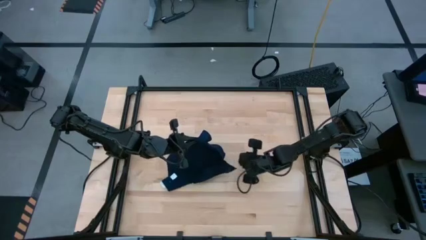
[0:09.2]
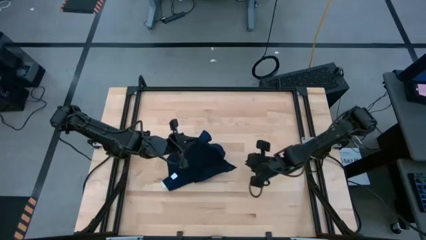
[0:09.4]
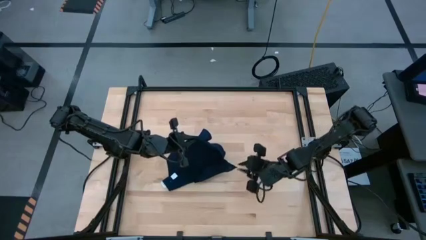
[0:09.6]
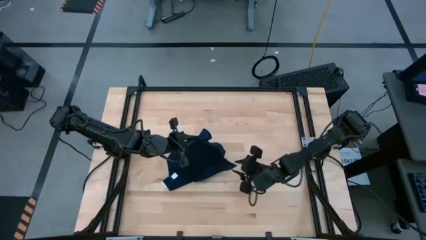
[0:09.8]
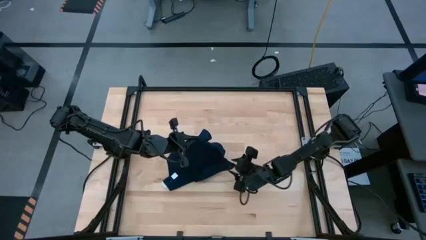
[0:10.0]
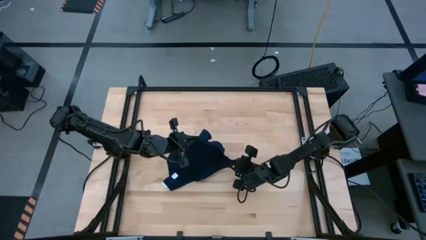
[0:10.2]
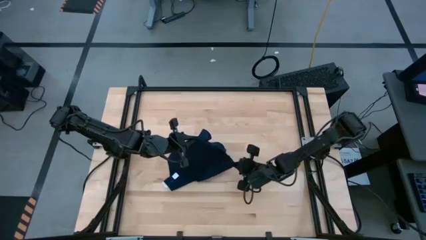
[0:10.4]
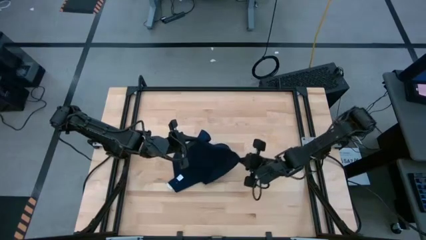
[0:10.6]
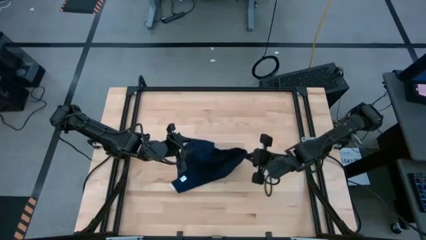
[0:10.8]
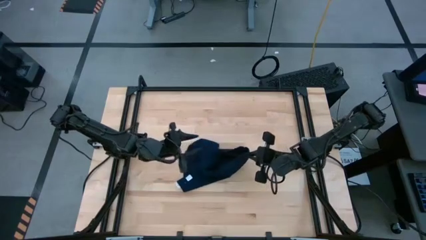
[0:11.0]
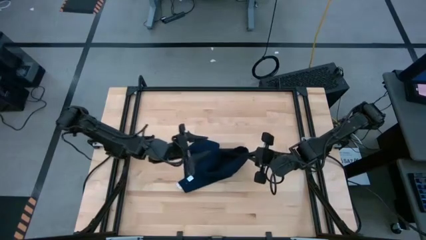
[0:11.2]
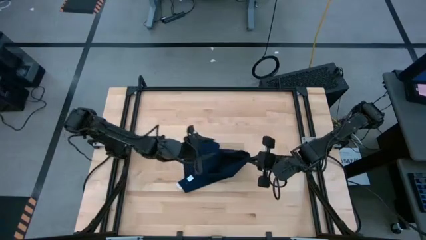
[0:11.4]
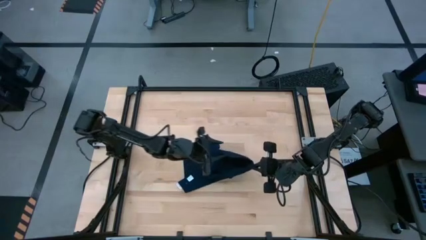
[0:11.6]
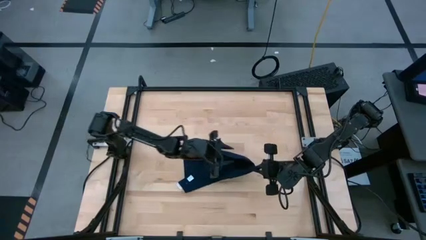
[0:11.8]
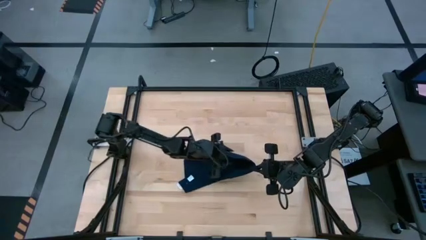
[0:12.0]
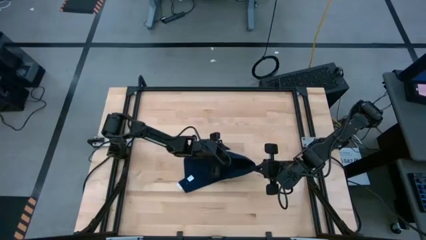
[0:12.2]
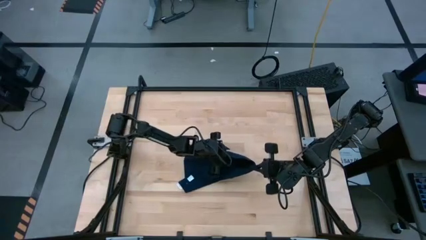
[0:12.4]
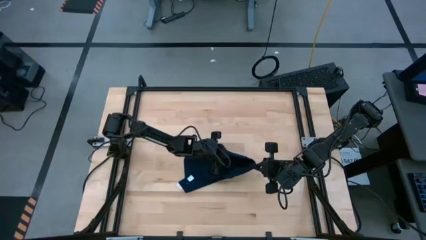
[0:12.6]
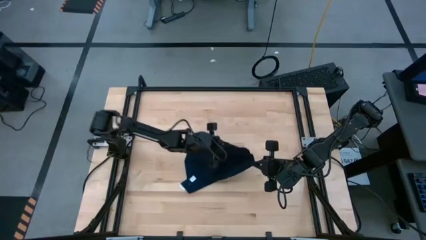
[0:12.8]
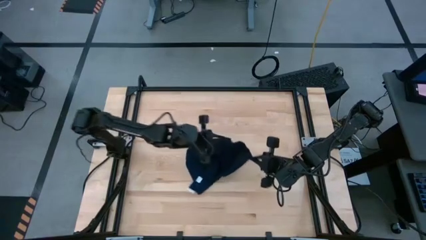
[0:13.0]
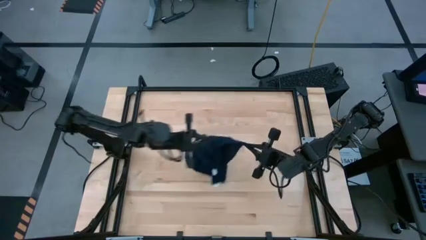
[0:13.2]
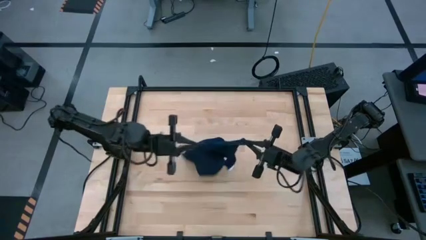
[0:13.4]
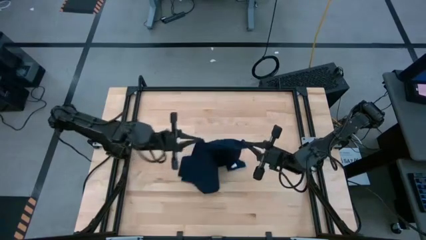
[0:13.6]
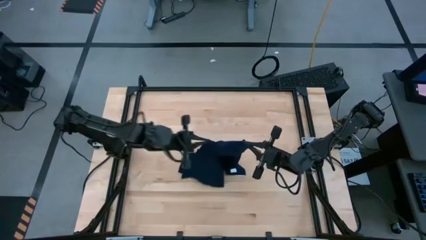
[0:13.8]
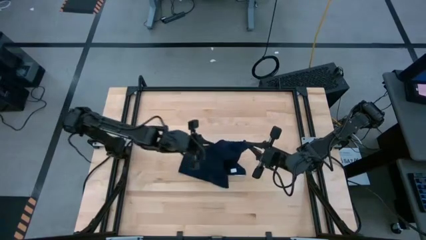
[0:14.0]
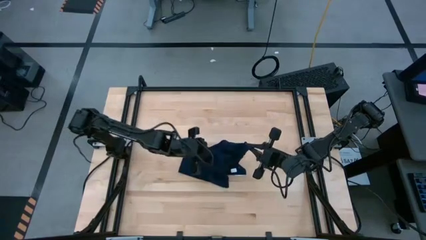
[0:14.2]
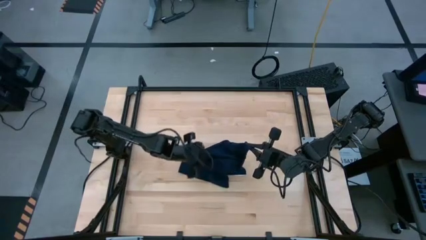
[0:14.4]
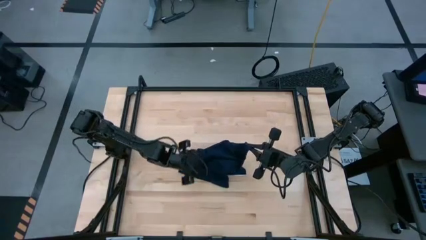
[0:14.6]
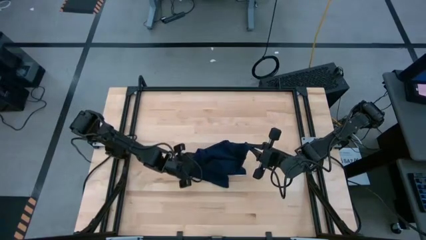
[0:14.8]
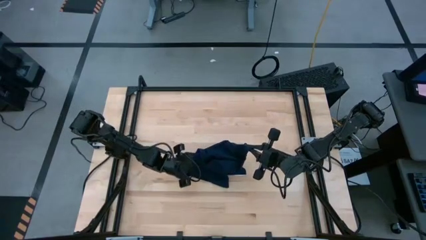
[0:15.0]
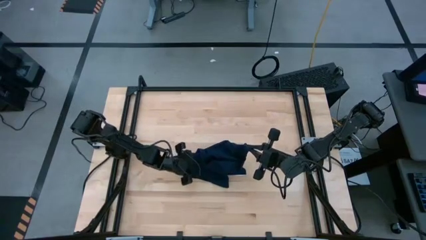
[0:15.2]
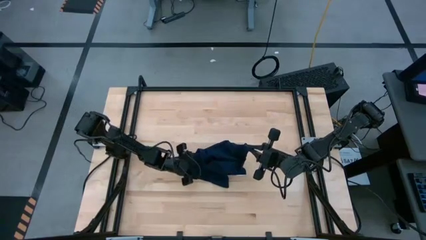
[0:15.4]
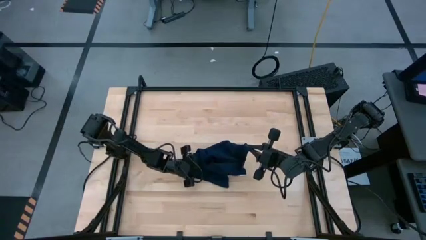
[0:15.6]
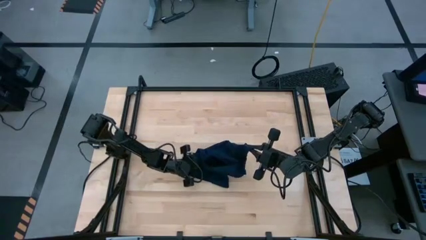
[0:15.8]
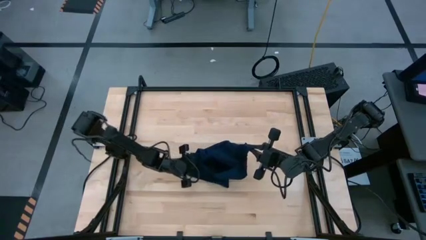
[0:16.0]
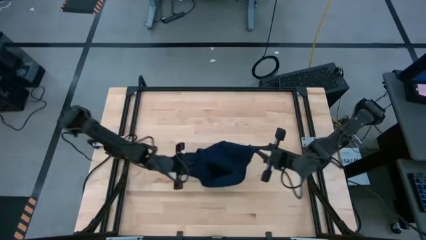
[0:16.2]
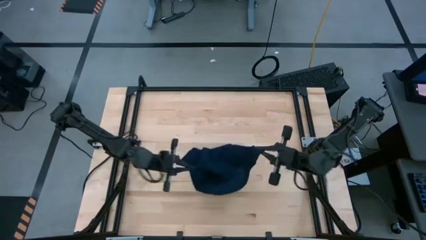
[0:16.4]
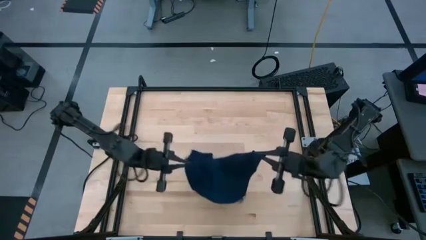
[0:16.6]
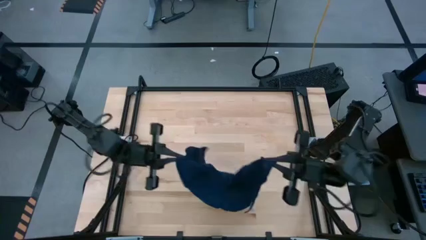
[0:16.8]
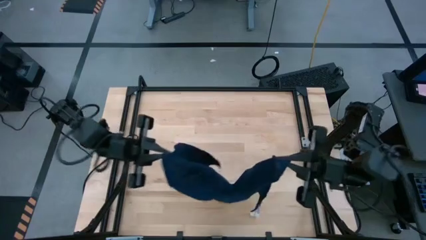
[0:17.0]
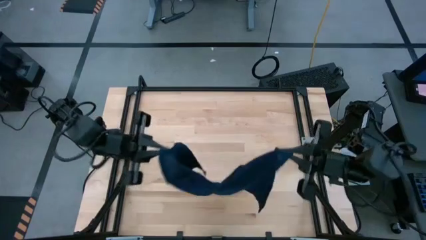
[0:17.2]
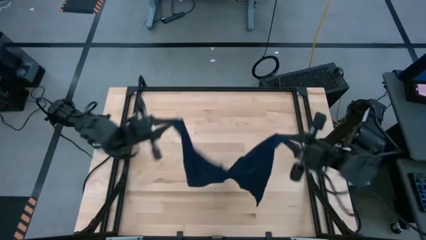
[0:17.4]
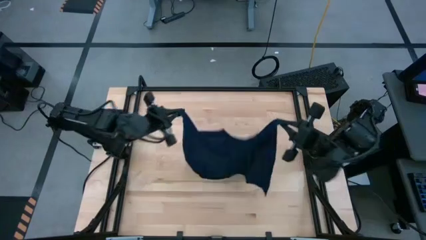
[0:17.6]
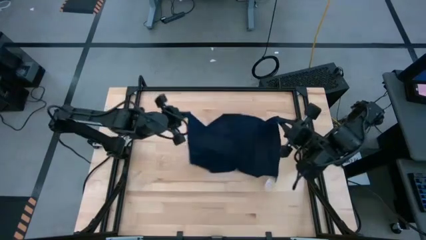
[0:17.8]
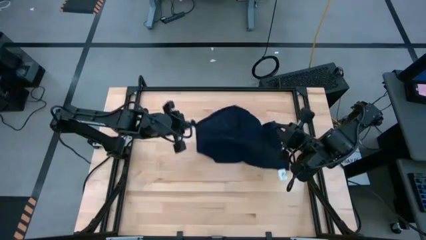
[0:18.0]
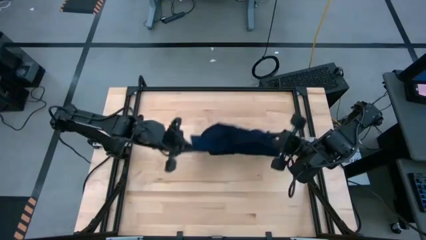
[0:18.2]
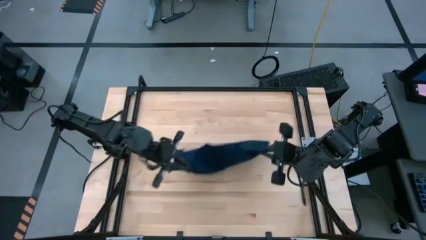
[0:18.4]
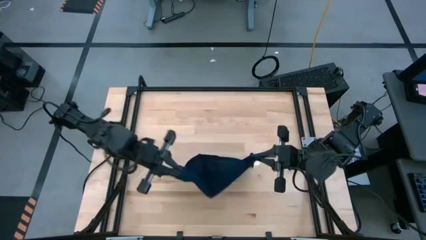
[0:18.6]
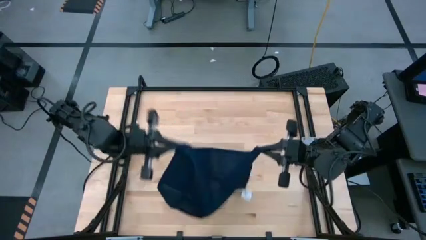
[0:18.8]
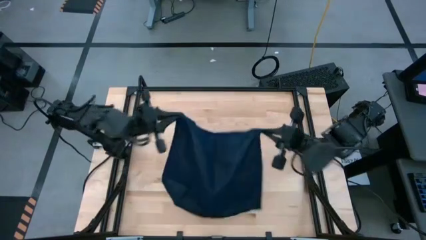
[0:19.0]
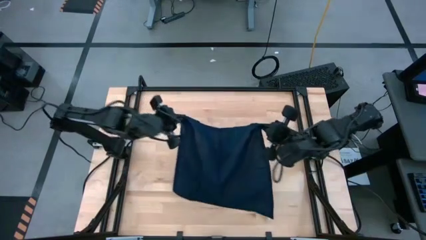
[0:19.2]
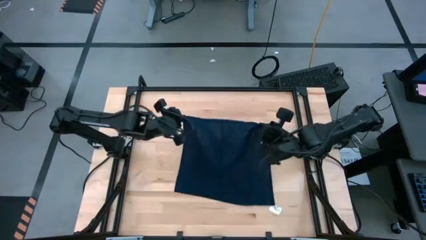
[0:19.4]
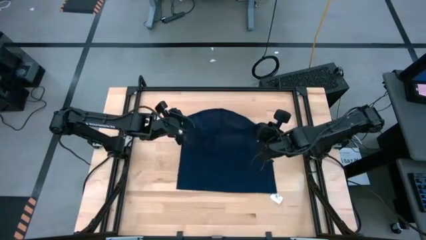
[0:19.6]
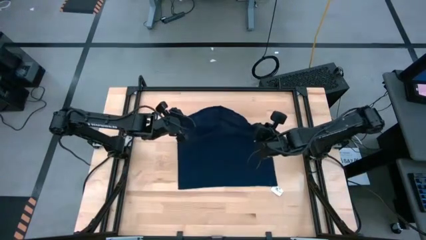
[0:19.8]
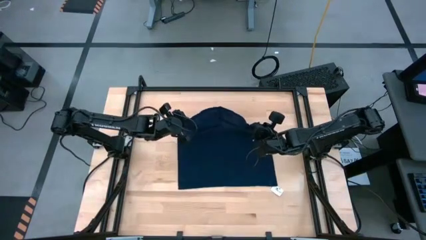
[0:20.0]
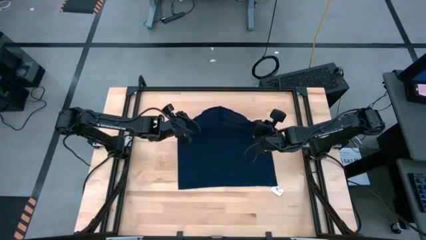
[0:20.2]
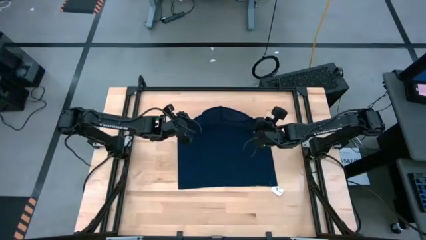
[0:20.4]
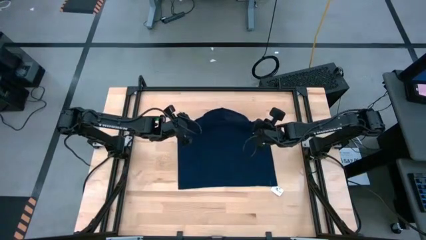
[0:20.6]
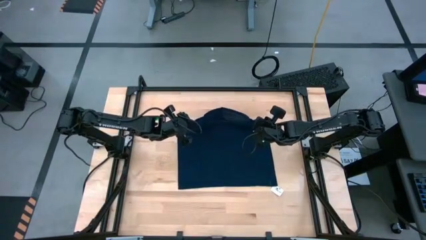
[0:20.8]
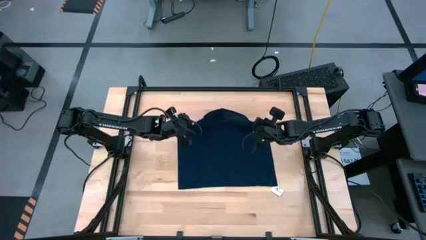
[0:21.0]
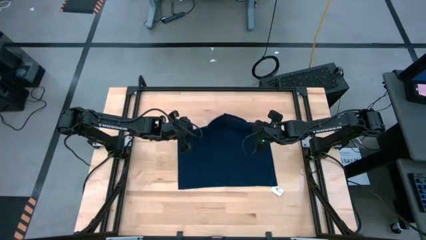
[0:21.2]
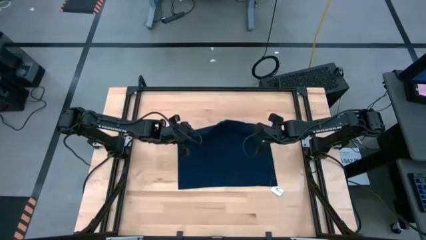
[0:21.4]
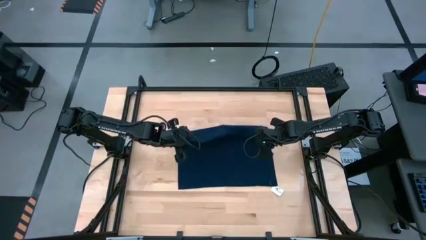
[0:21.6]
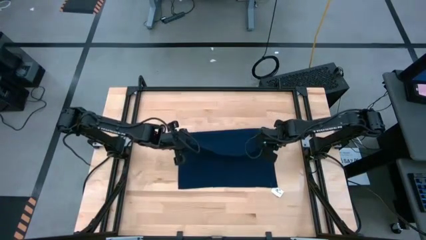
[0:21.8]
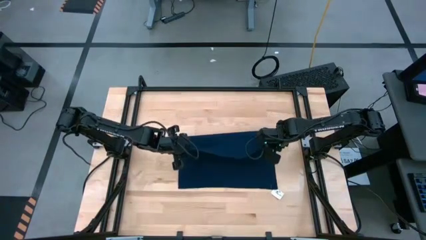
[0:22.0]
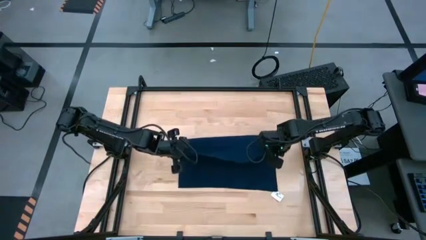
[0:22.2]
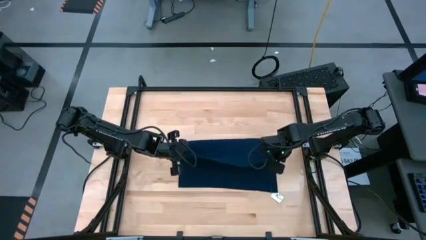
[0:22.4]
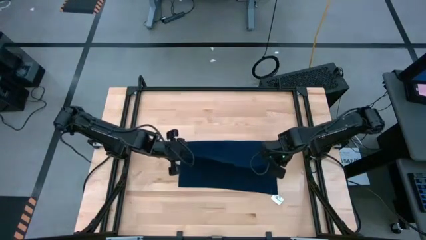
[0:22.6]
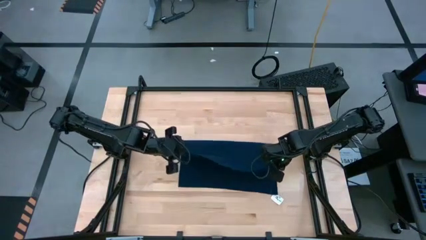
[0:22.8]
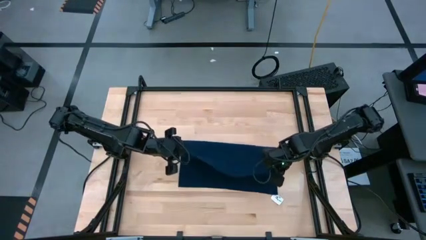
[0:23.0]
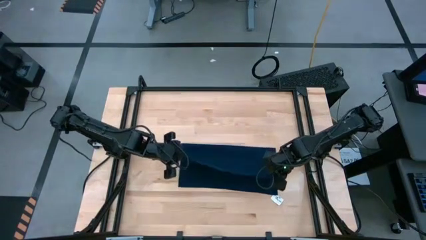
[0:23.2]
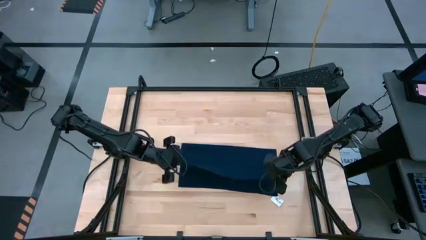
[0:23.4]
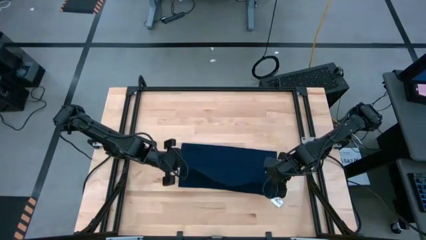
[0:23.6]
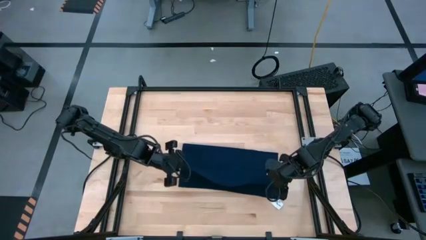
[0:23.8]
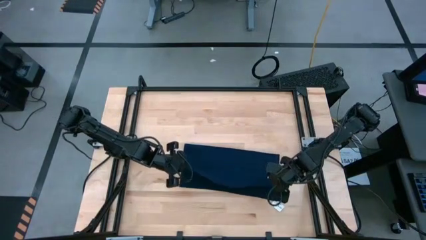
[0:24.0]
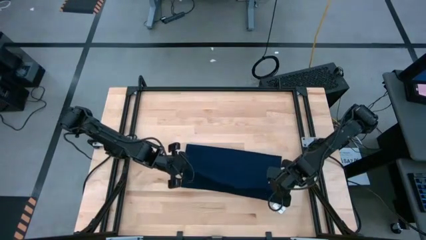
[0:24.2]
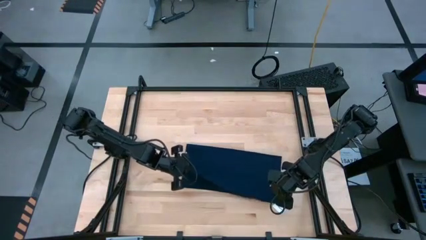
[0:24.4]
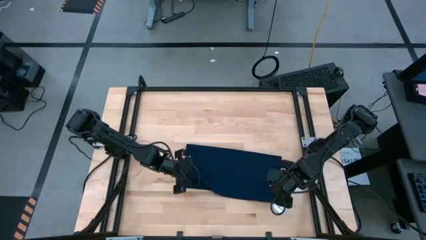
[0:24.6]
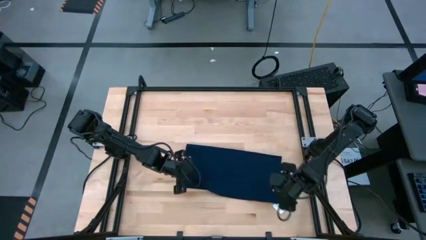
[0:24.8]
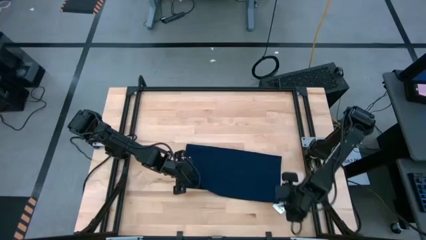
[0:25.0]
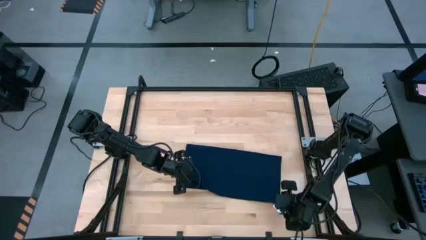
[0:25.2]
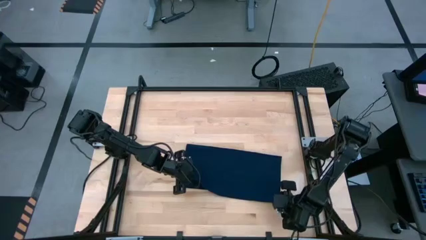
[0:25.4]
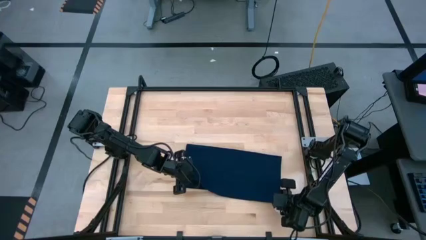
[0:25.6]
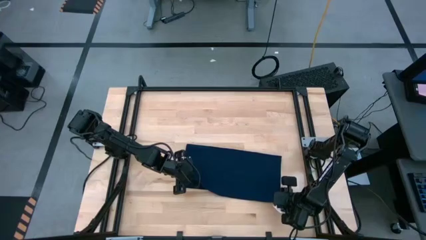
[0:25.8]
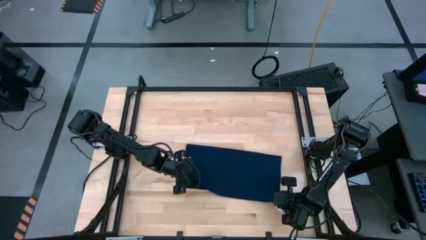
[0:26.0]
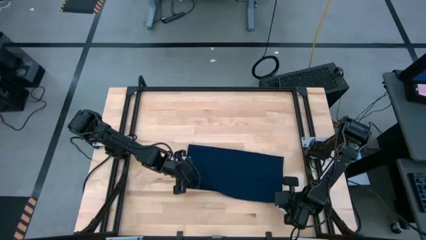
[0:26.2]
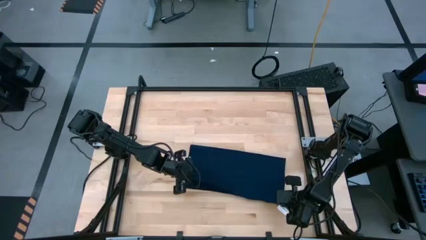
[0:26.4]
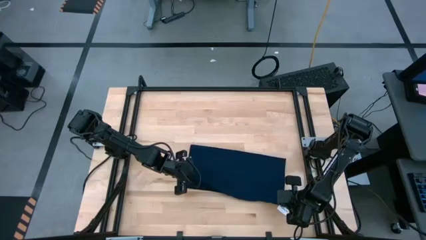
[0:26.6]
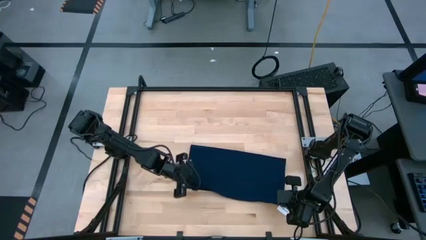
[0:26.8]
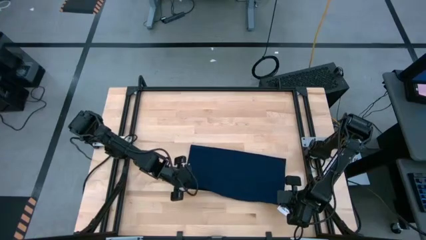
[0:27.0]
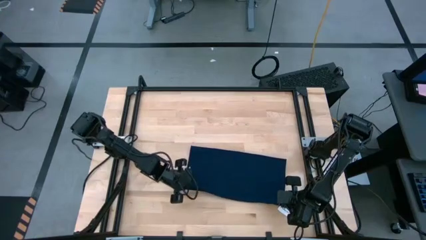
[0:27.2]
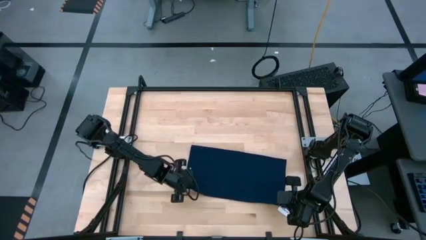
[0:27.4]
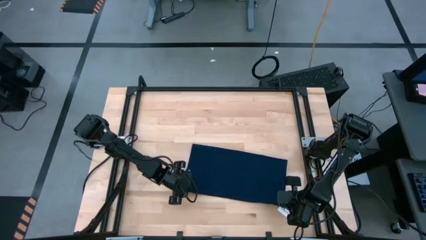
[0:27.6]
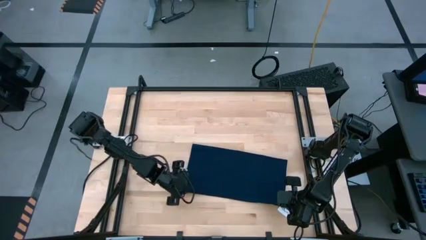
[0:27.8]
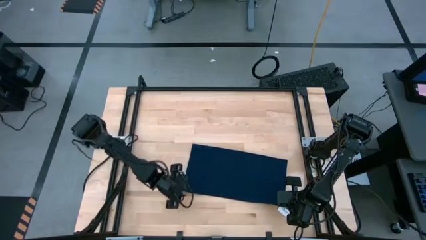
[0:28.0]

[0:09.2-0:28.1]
Task: Roll towel into tight, uniform cylinder
Roll the blue cloth napkin
